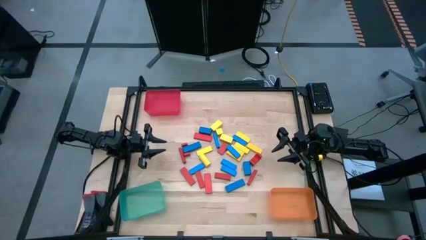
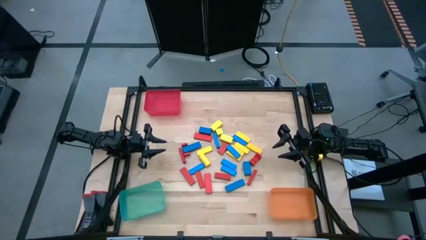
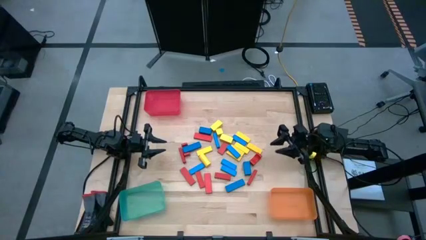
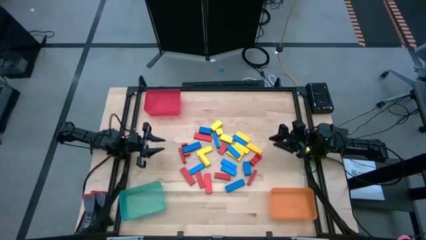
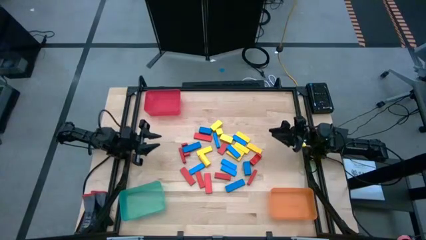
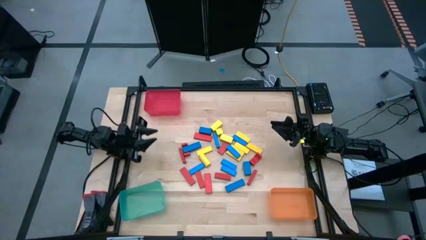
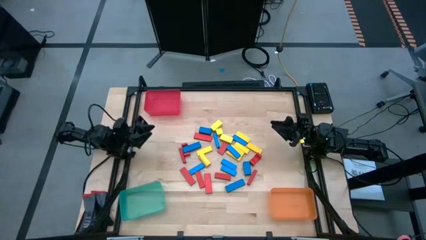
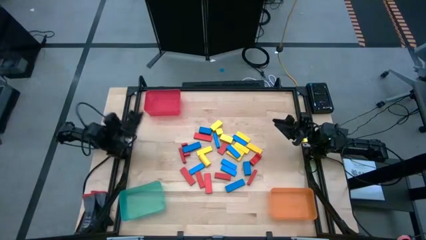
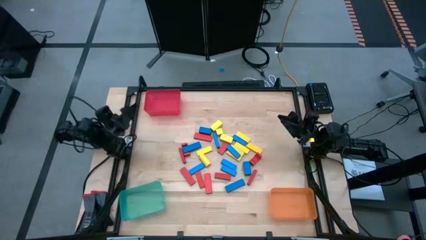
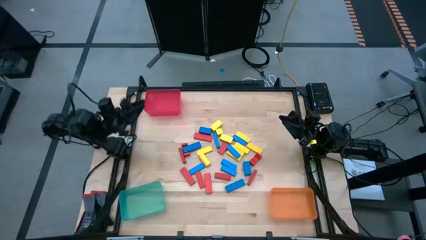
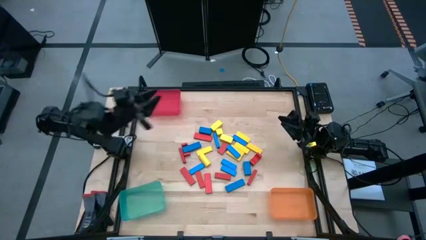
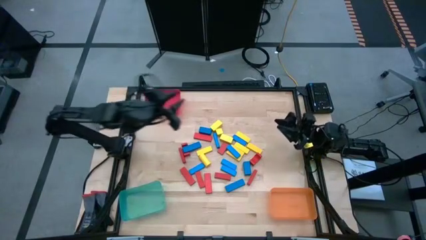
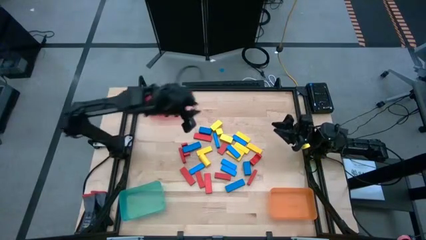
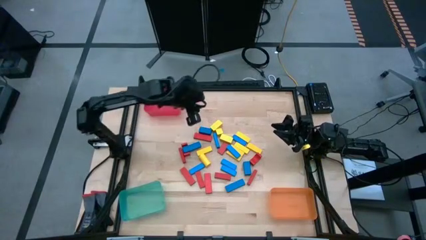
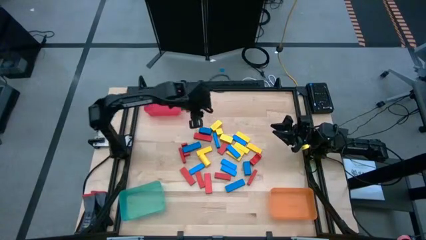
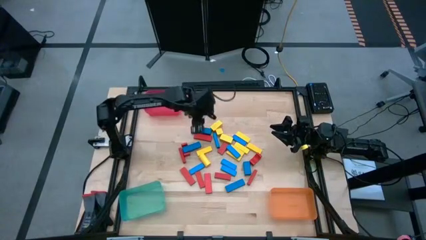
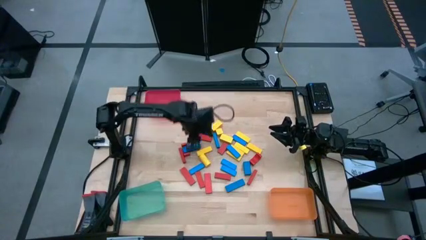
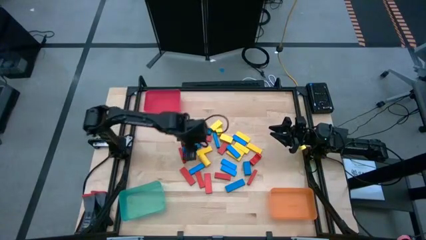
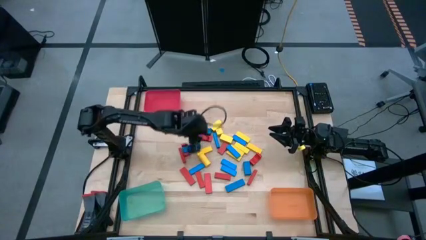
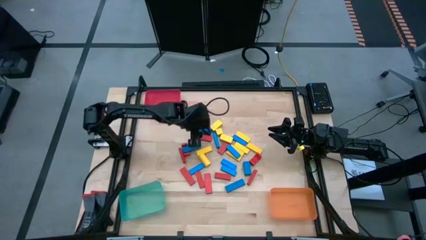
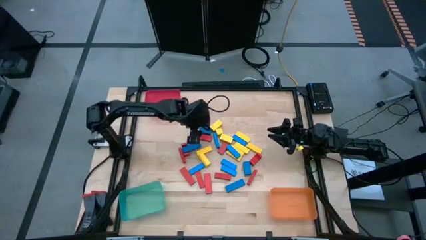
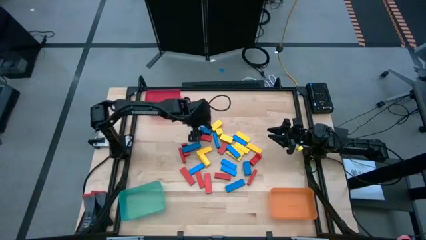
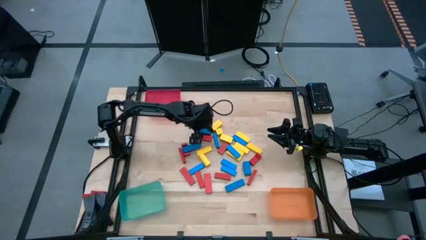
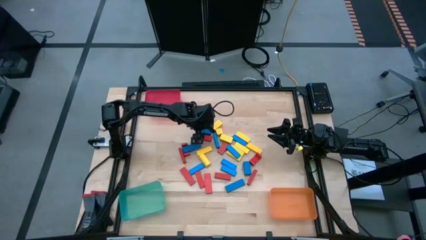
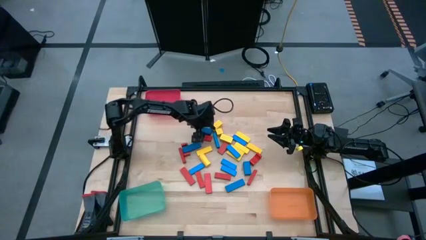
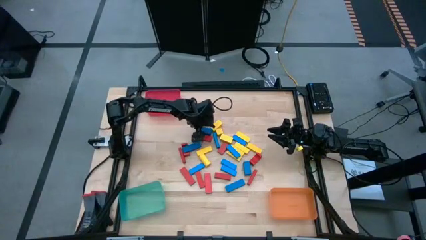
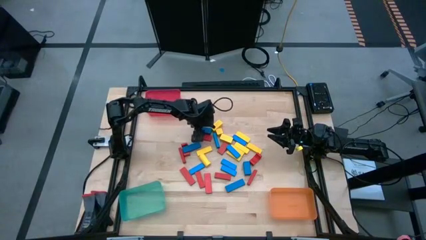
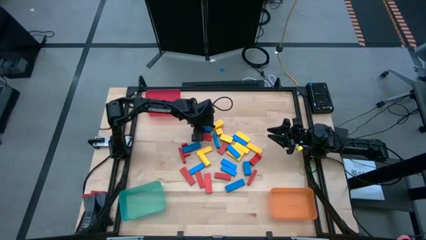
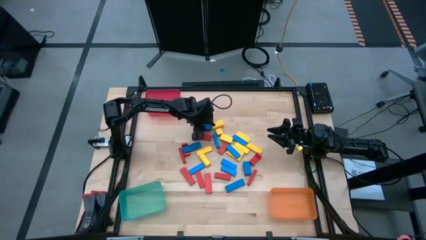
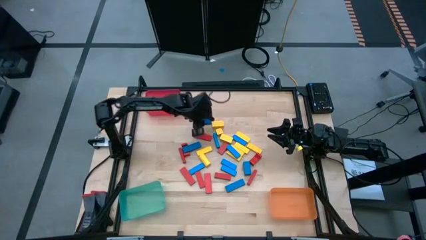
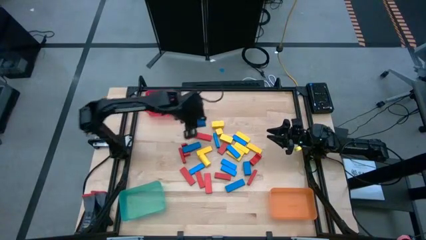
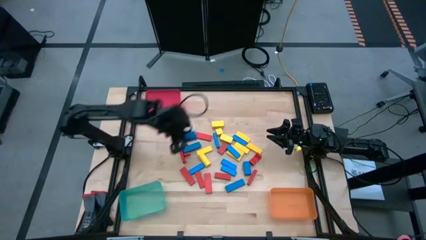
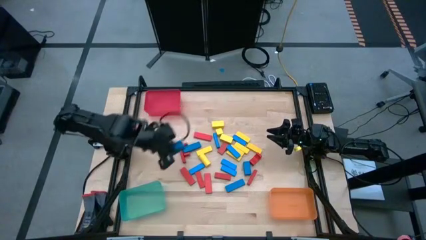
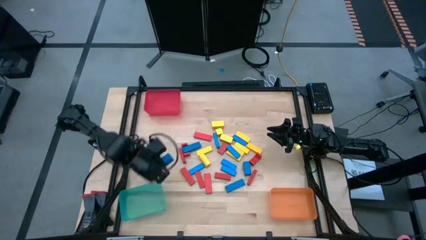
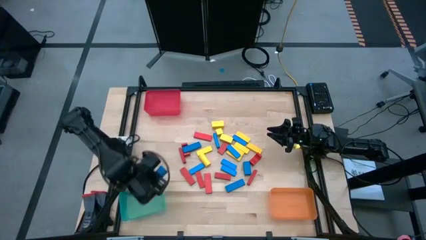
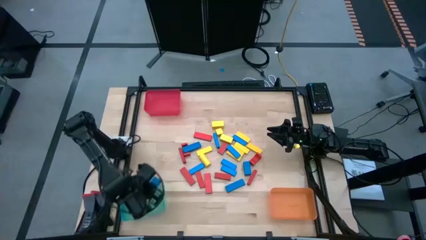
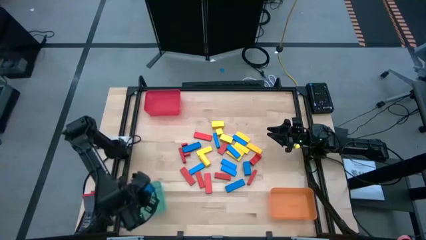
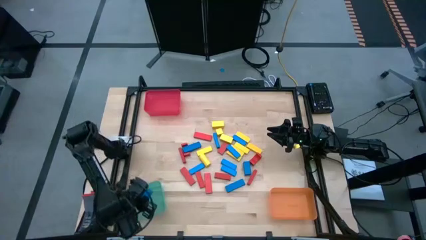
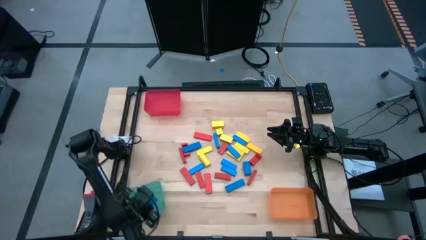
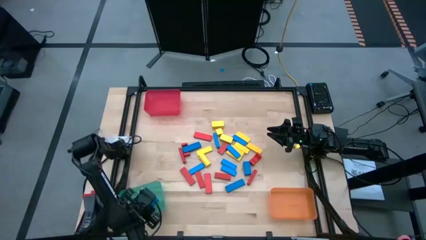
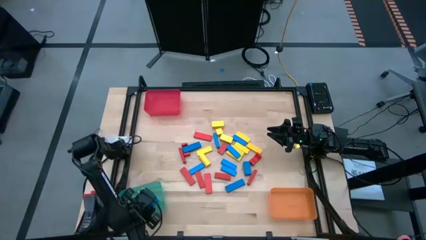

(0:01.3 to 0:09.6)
Task: Sort blocks
Put the blue block into the green bin

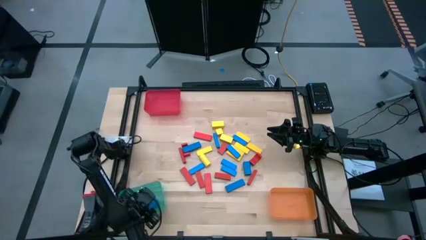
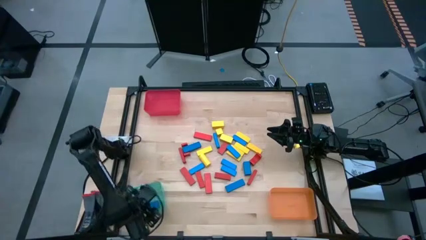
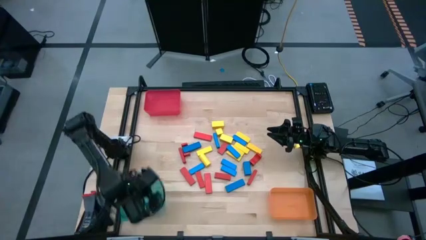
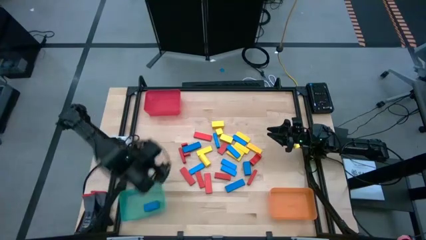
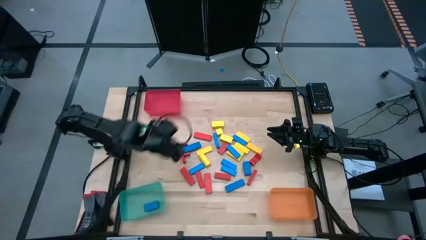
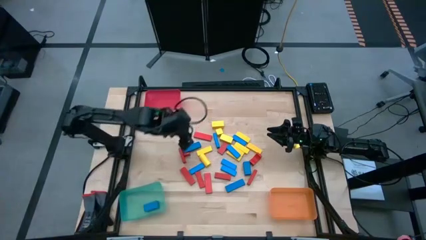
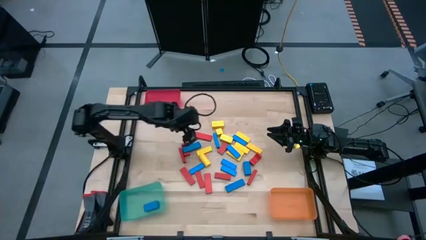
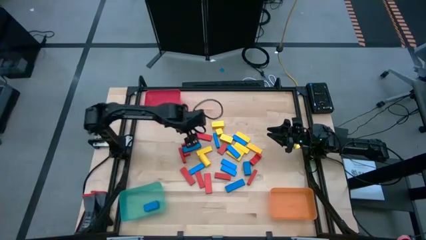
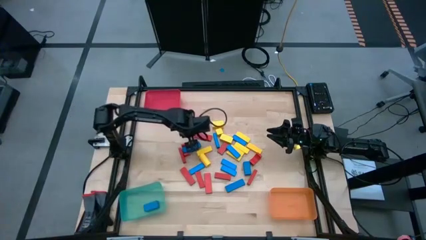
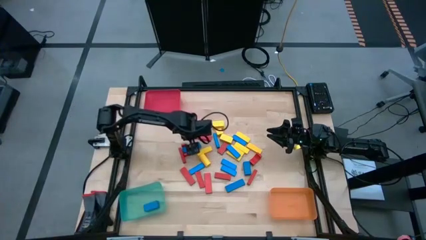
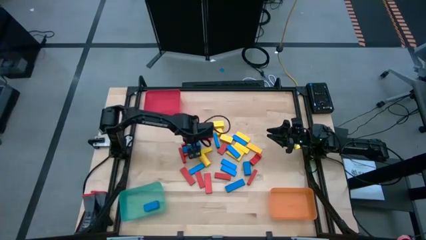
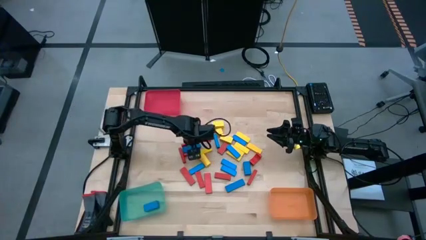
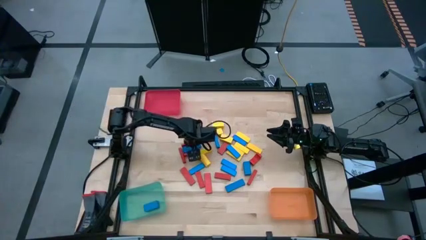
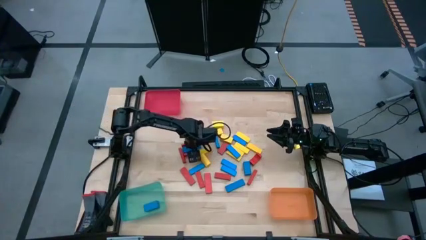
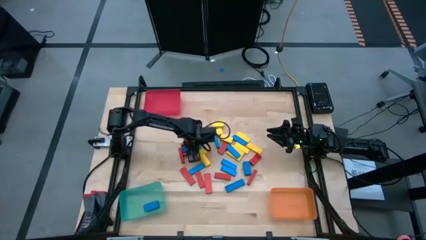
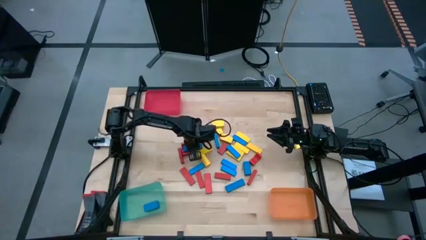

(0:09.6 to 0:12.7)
Put the blue block into the green bin

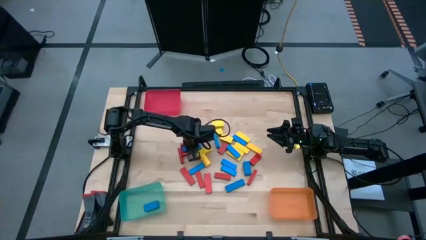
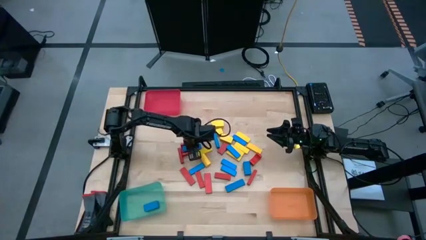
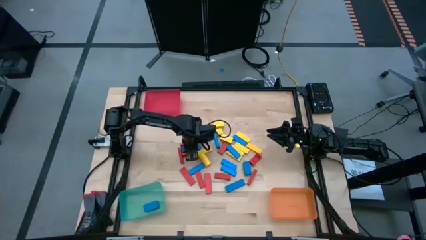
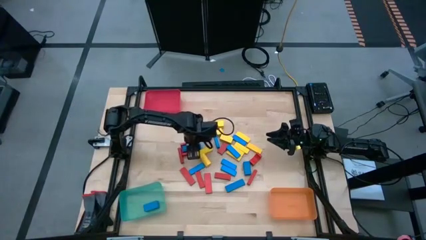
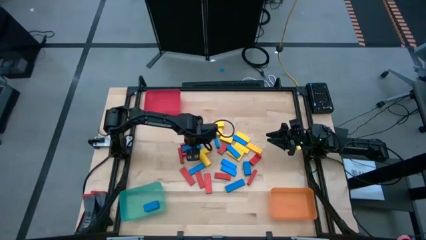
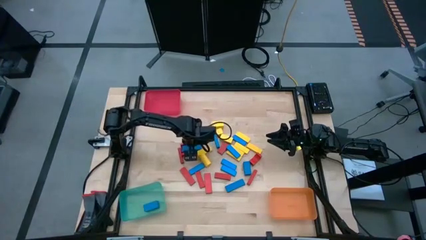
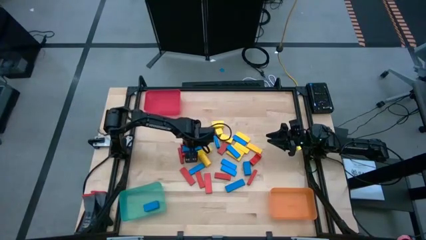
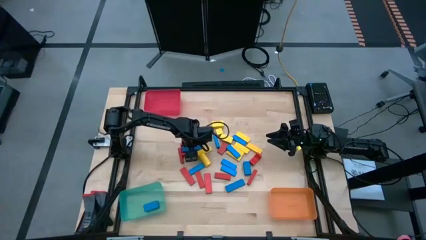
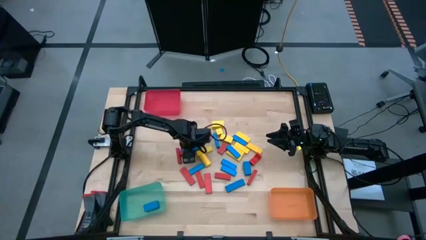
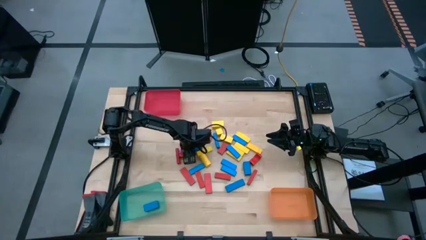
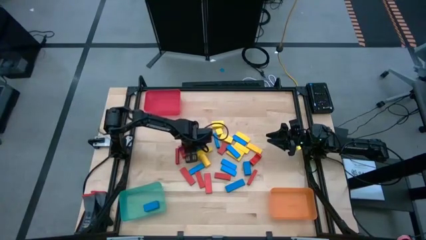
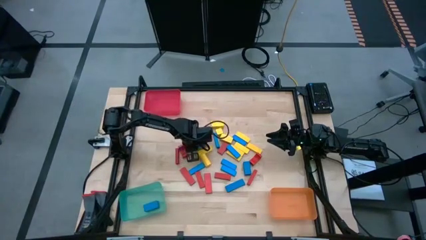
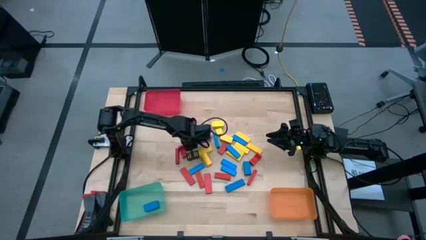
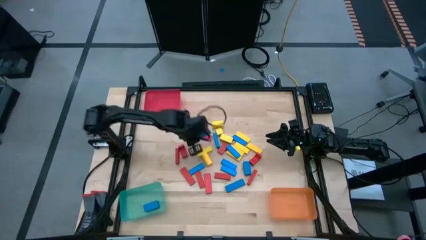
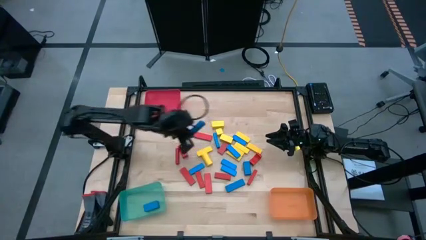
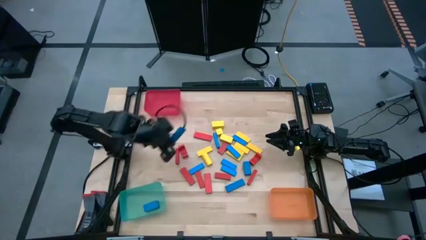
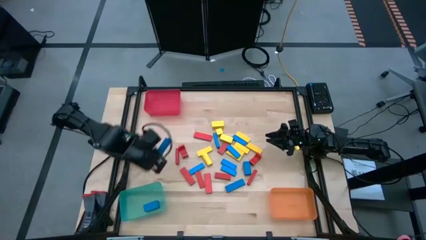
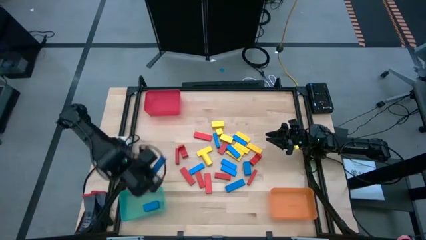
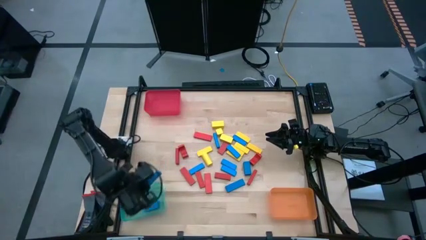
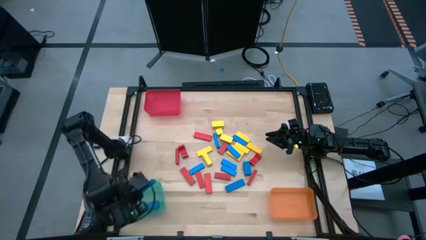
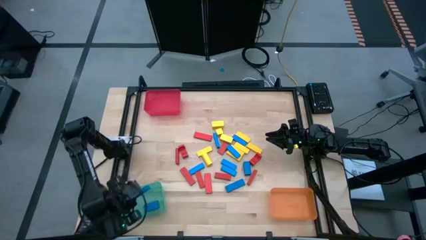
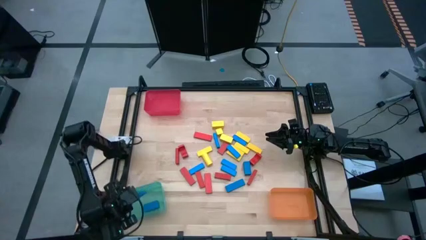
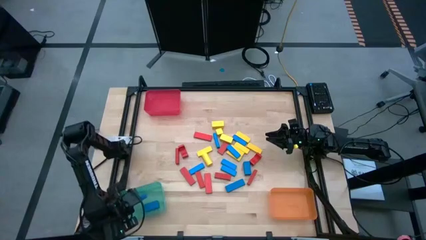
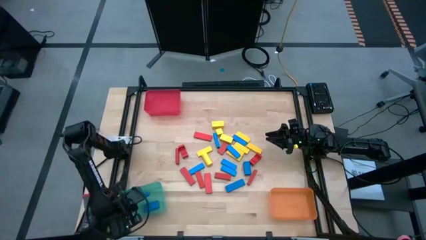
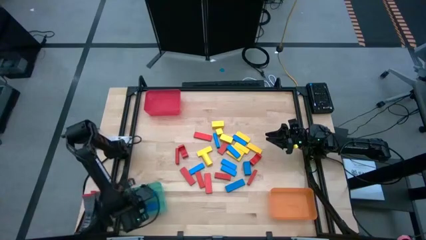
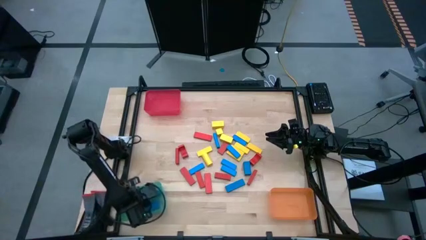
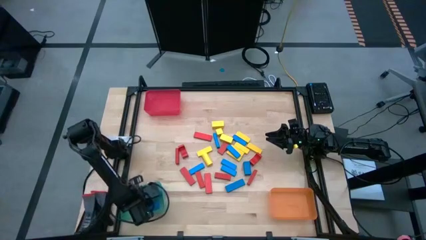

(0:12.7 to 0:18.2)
Put the blue block into the green bin
